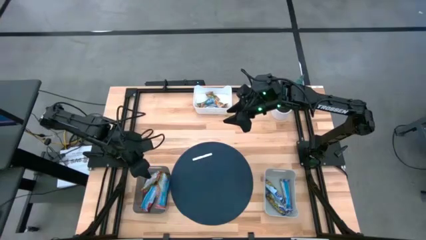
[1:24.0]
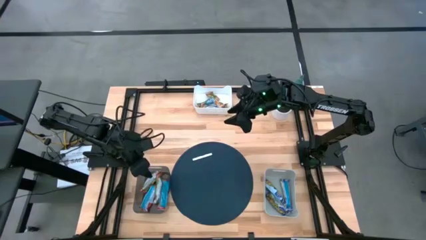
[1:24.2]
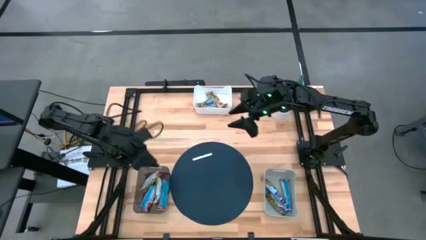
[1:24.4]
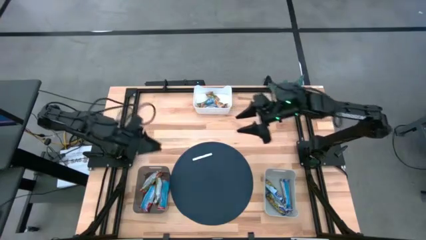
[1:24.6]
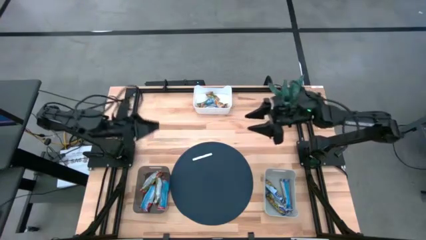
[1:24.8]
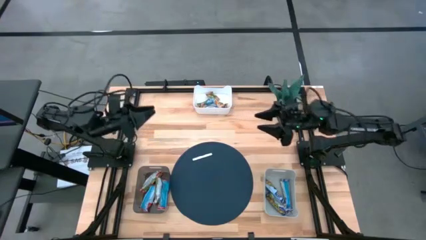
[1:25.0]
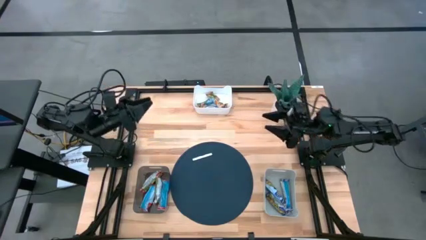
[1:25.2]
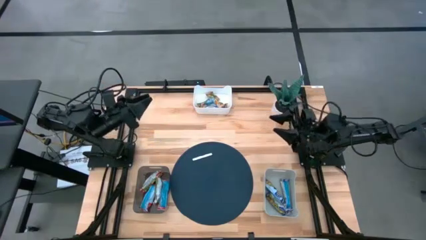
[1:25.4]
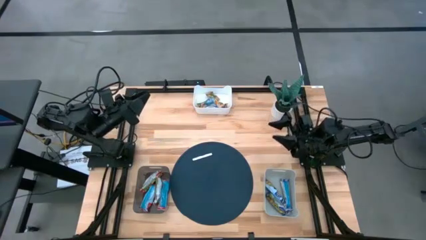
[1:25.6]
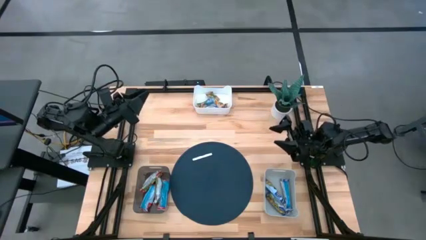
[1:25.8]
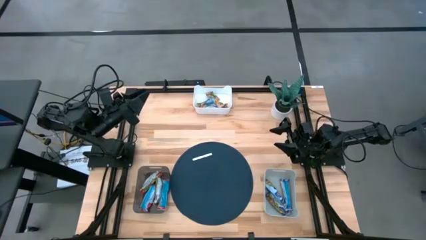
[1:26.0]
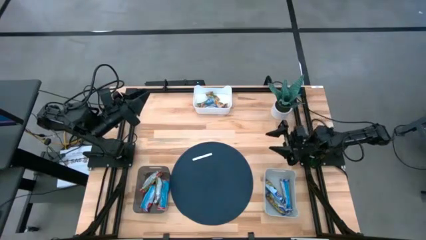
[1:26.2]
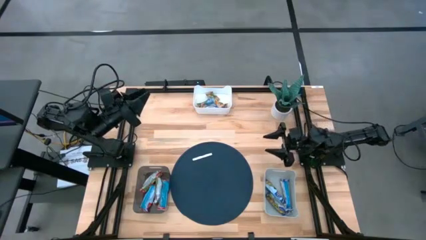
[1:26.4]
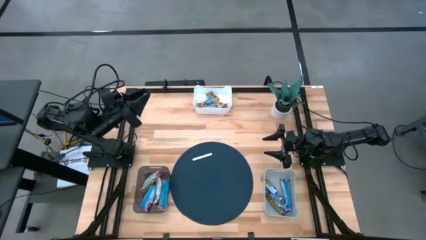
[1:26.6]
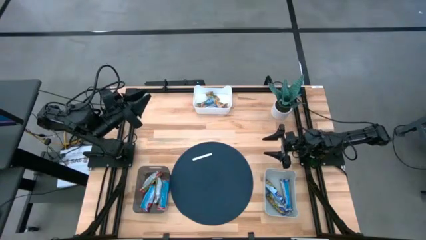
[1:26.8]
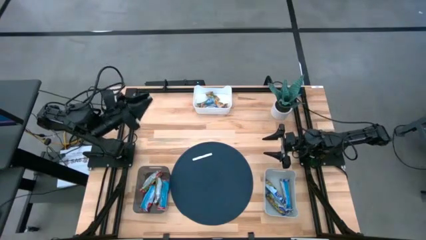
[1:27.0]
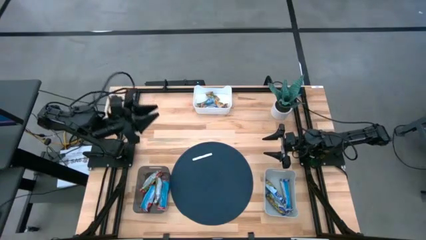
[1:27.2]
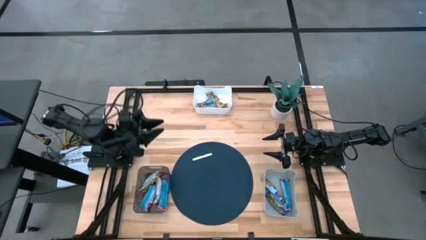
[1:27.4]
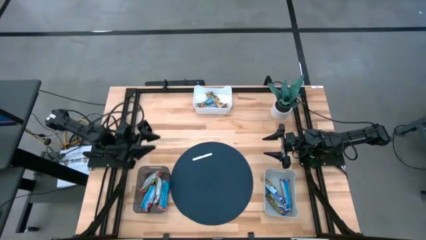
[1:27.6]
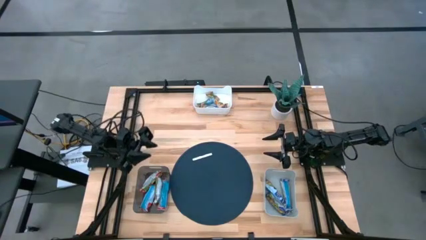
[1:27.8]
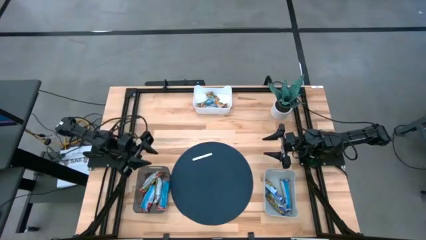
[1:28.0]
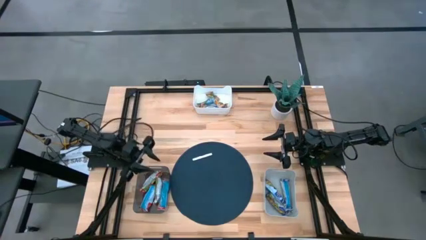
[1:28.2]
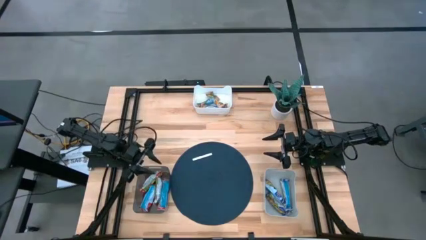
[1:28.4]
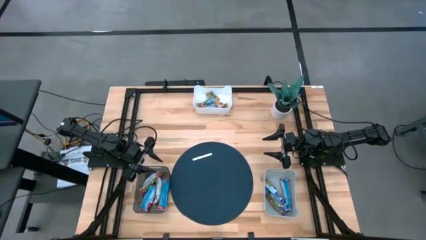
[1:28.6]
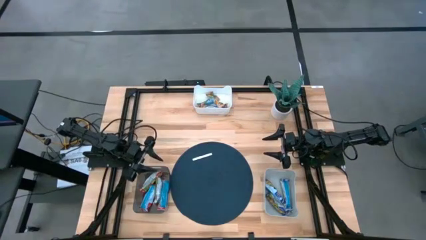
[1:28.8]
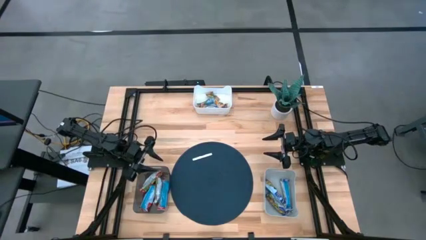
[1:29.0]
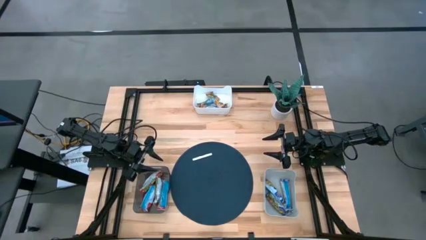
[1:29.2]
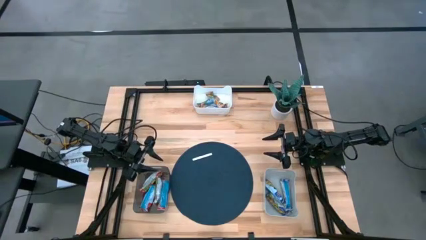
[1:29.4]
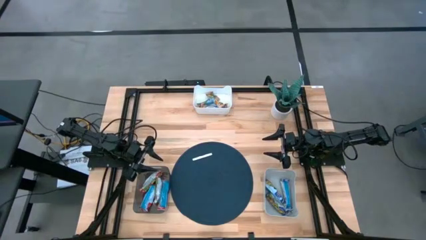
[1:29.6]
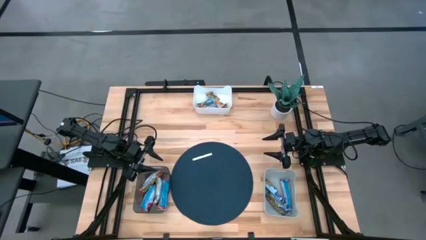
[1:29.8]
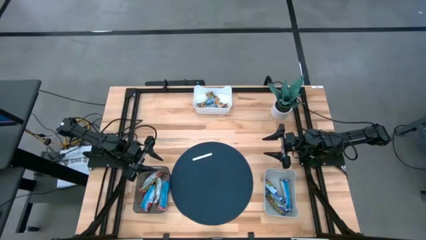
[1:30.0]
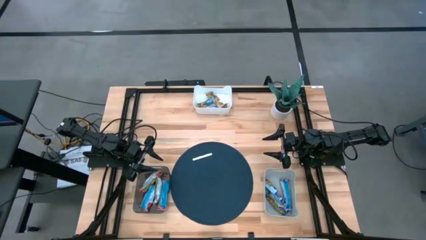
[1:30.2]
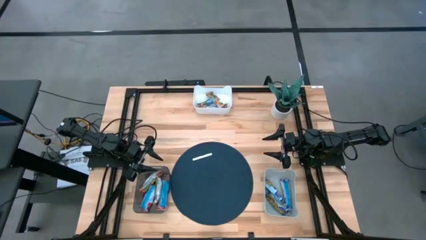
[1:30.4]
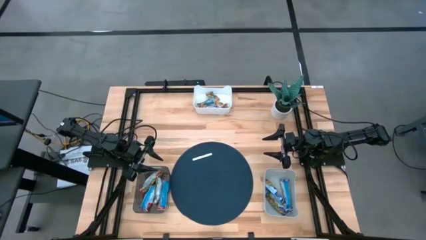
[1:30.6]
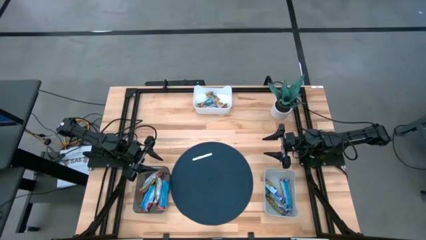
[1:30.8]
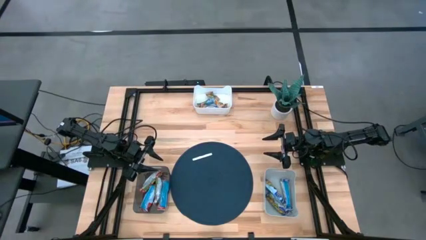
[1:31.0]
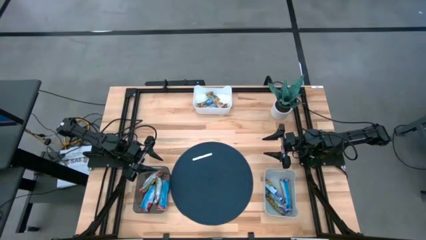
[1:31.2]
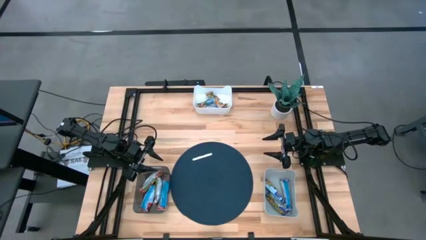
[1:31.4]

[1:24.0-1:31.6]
Task: Pick and place Granola Bars by type
Return to Home Position

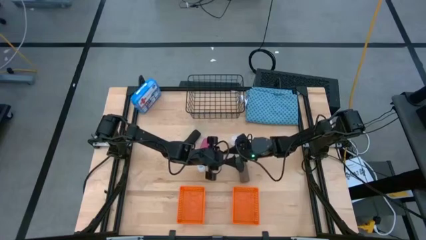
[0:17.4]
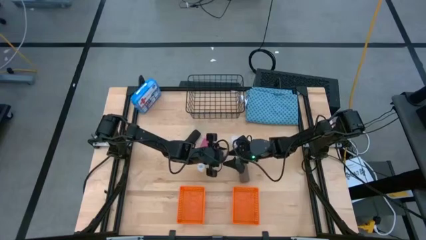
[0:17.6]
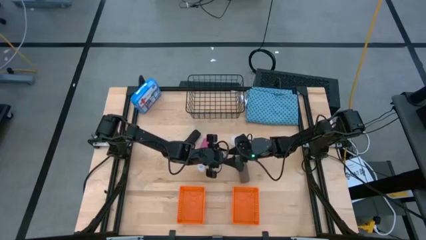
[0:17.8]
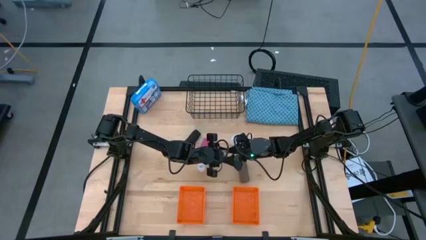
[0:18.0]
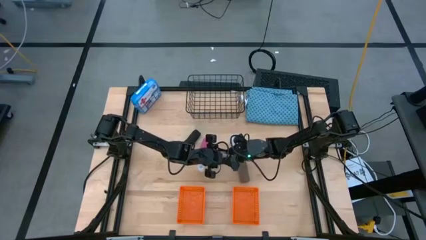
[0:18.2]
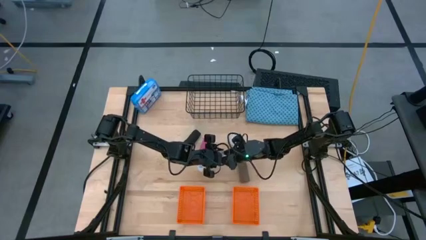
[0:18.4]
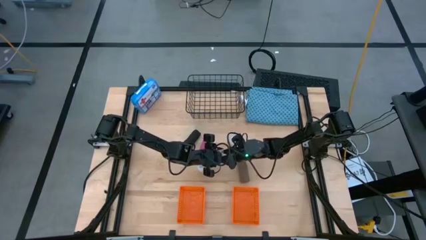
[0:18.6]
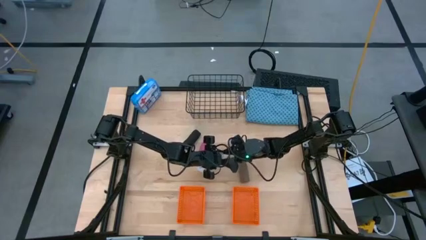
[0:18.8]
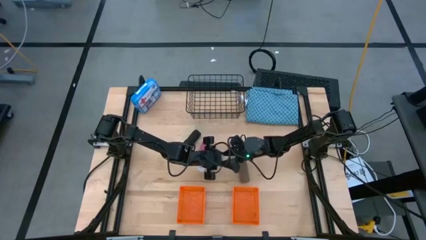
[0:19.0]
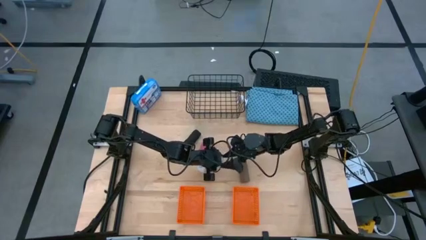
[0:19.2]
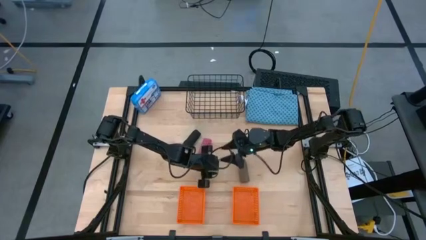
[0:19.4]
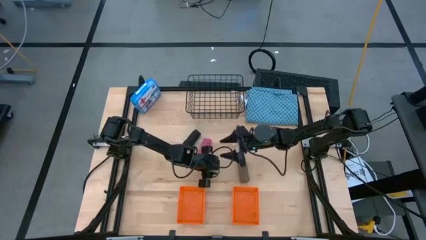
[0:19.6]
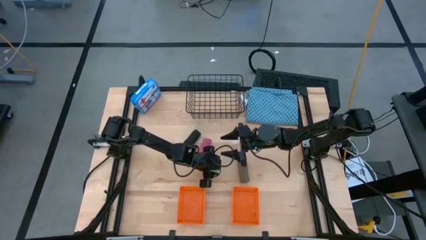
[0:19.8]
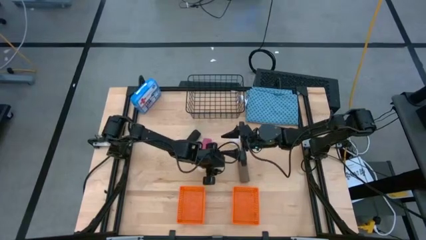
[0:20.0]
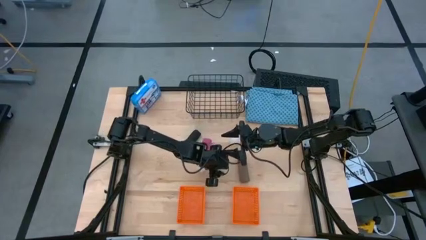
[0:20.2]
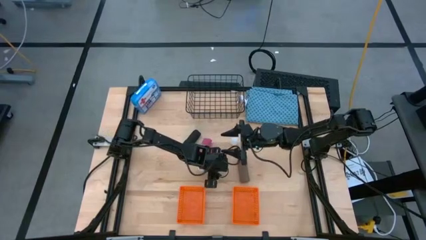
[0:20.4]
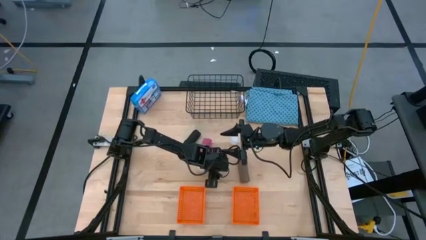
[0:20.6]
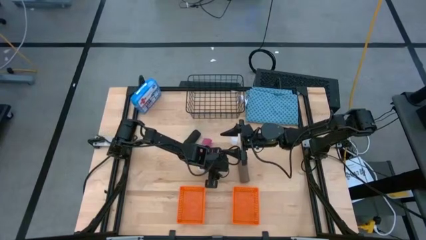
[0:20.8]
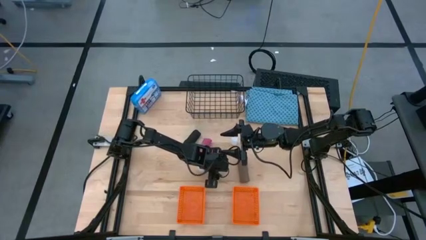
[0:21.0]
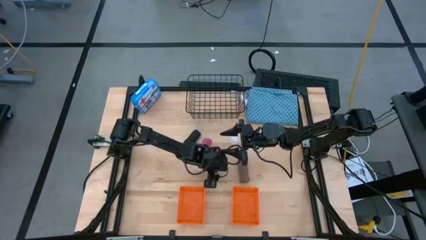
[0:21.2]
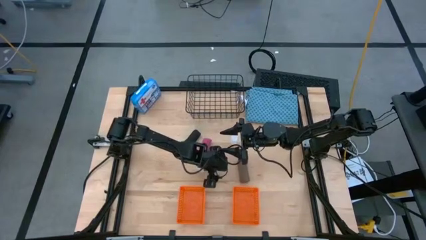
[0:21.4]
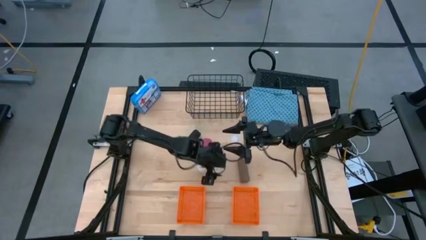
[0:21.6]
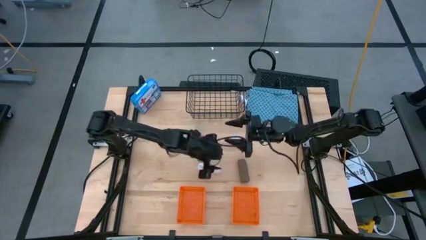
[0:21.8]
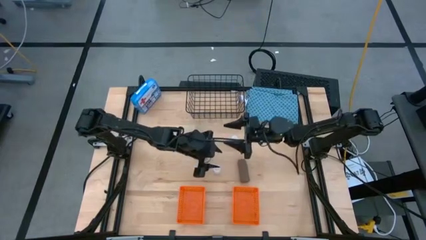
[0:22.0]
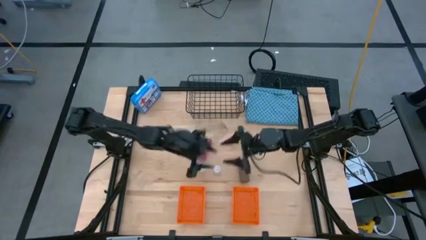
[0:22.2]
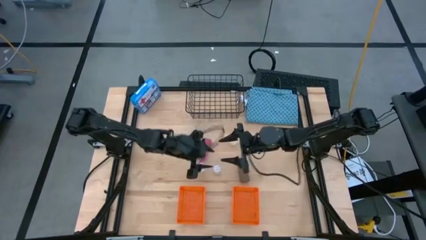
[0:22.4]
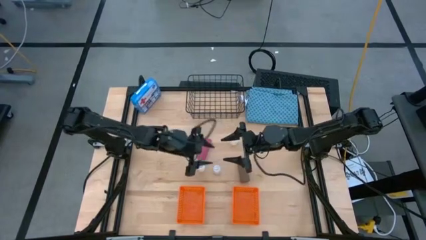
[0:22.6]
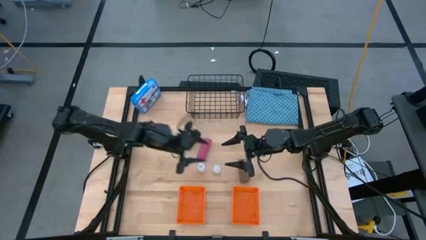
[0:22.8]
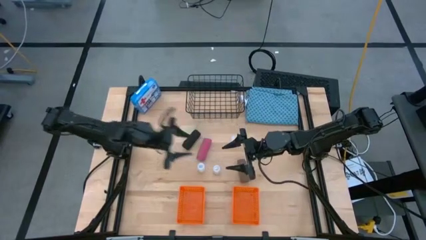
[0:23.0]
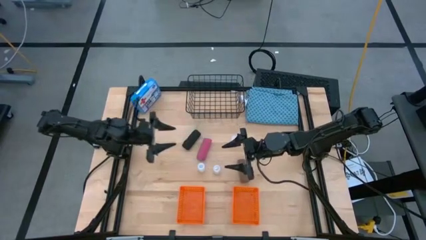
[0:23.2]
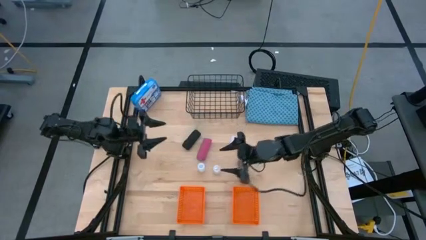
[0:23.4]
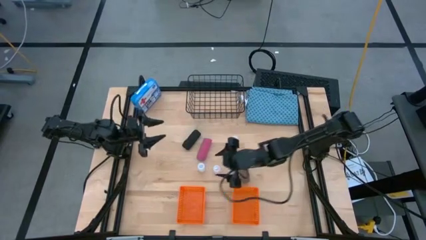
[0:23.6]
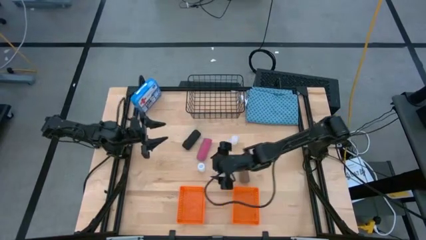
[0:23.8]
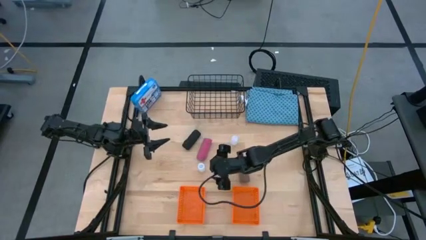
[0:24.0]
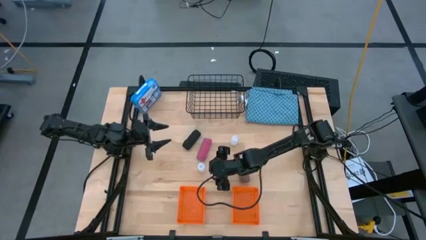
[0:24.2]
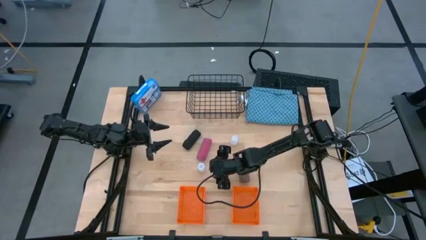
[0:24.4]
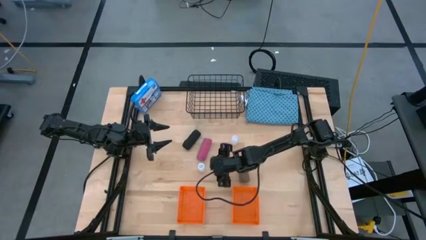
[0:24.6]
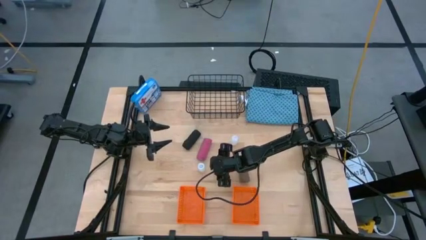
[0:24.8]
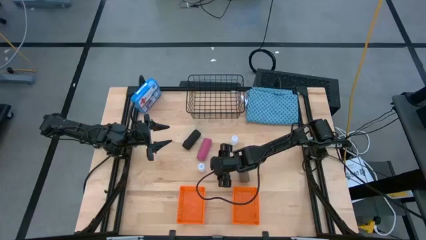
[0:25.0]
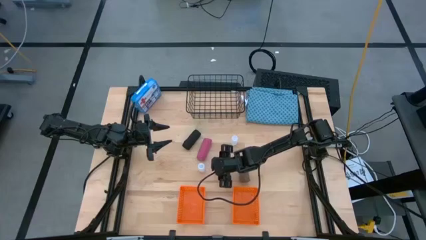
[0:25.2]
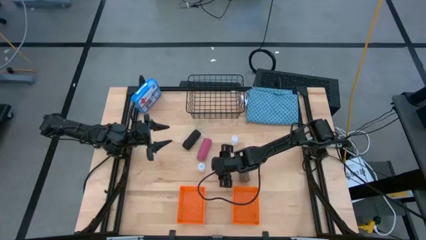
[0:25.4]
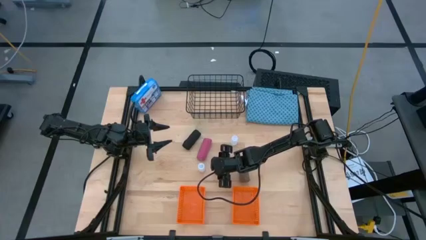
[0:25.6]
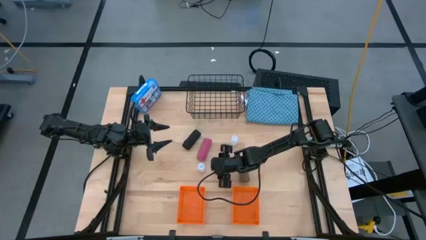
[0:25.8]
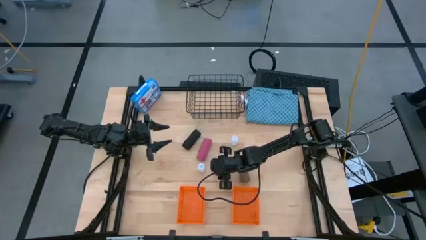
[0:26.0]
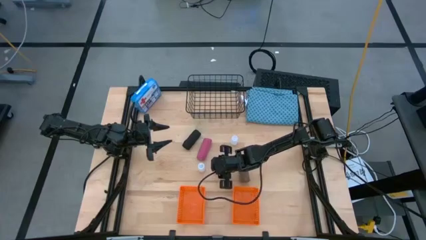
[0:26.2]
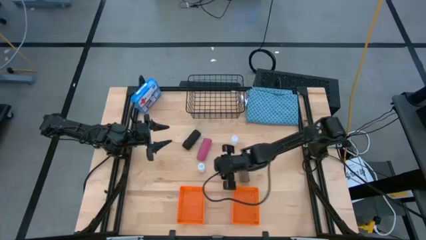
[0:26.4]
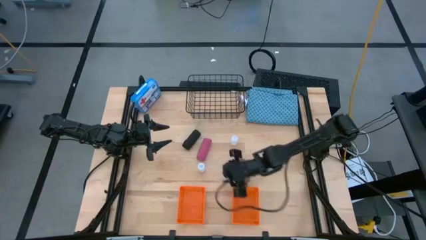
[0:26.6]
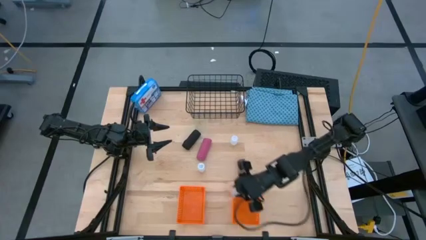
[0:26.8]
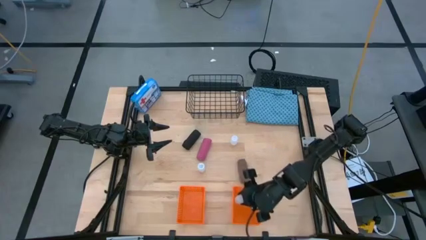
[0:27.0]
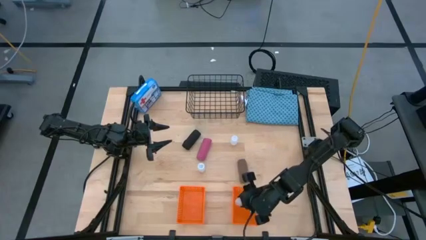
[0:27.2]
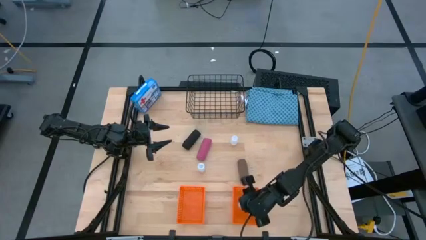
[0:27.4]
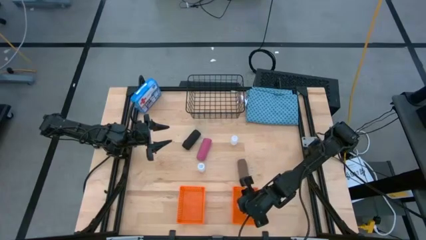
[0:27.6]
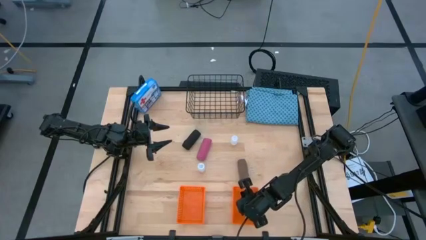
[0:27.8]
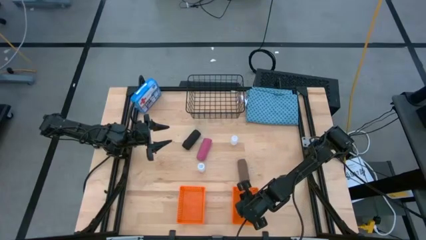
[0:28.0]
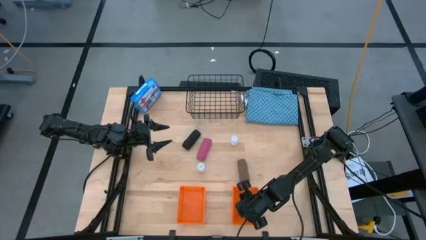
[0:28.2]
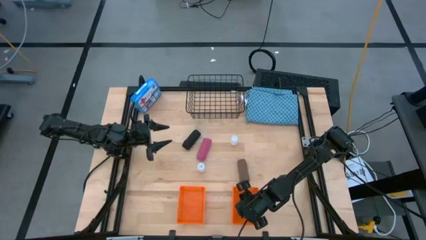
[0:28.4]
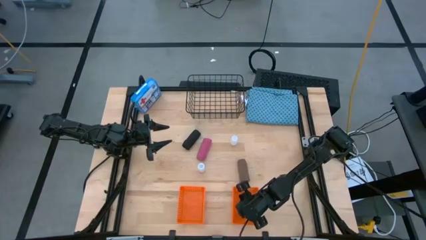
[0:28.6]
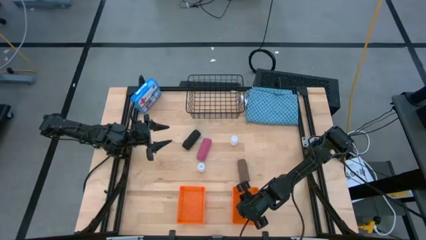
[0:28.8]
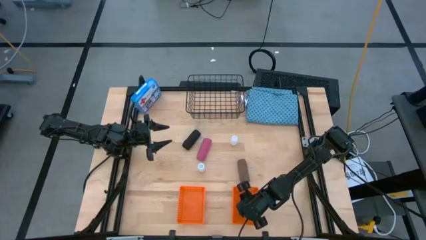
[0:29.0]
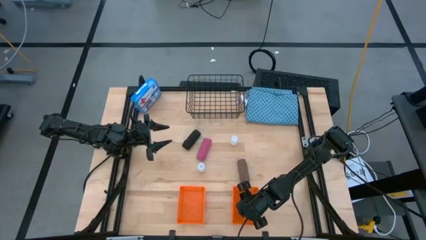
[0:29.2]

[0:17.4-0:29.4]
Task: Pick & Place Medicine items
Put the bottom left transparent pill bottle into the right orange basket
